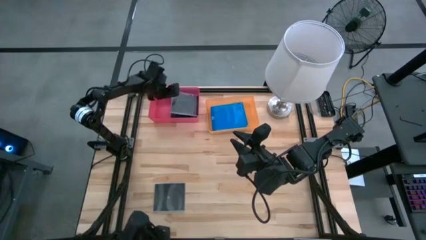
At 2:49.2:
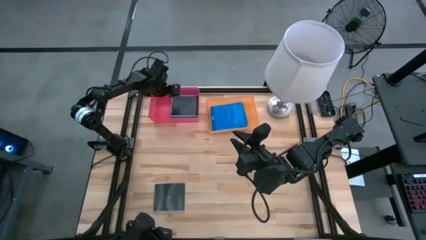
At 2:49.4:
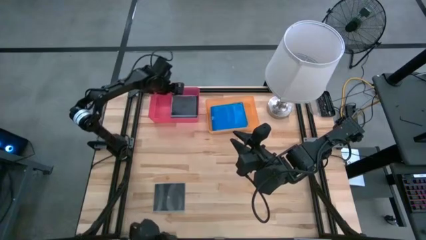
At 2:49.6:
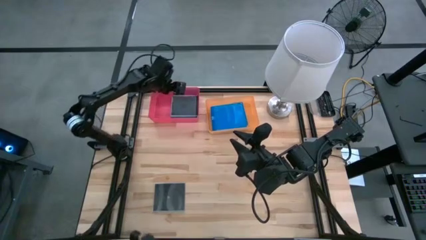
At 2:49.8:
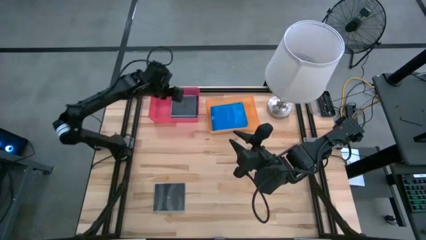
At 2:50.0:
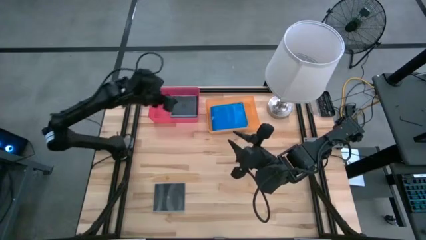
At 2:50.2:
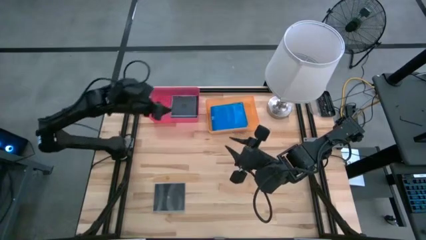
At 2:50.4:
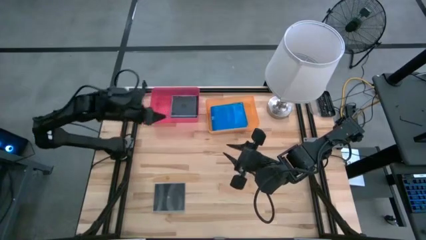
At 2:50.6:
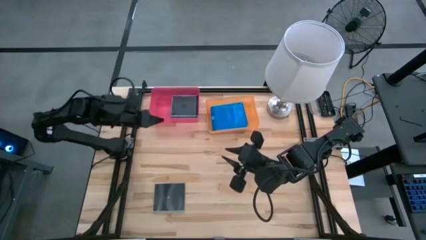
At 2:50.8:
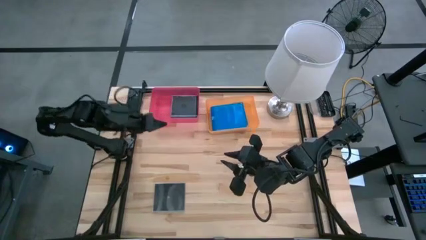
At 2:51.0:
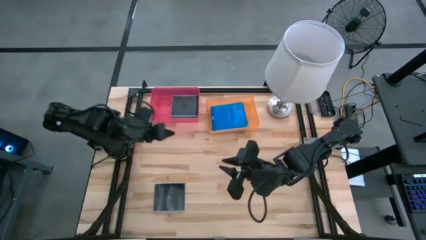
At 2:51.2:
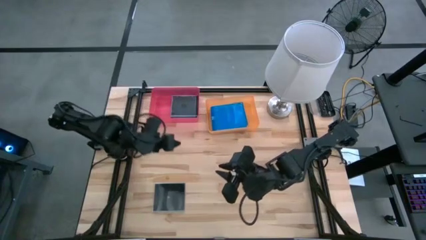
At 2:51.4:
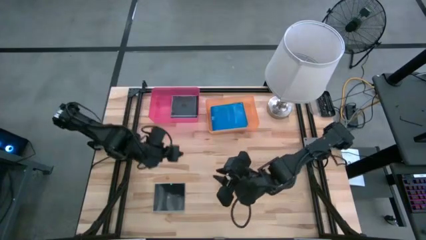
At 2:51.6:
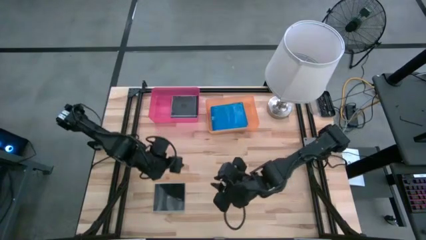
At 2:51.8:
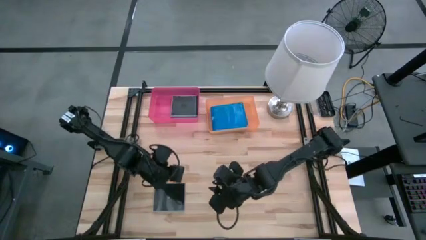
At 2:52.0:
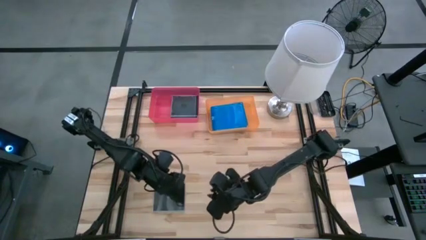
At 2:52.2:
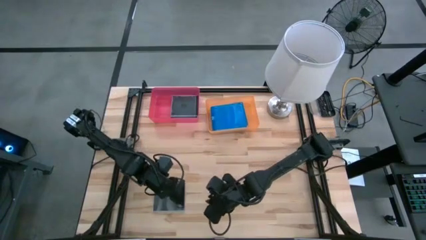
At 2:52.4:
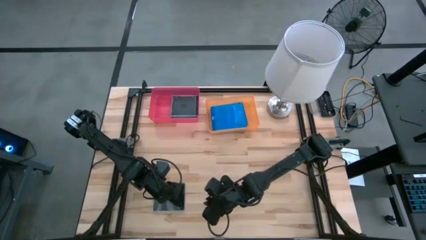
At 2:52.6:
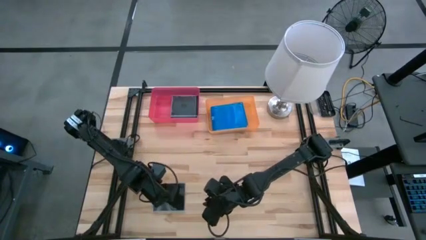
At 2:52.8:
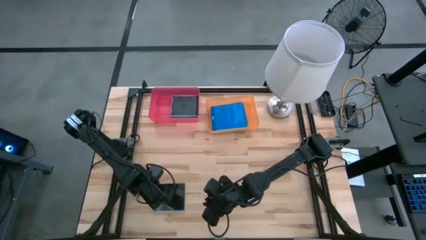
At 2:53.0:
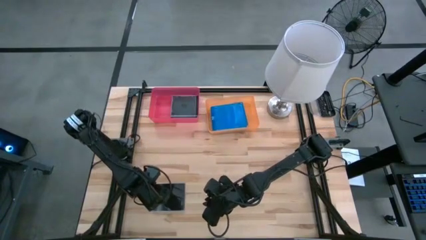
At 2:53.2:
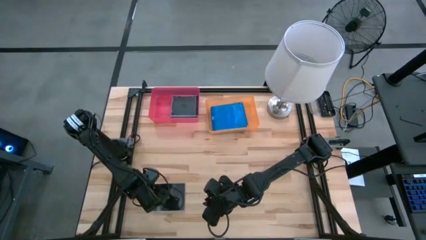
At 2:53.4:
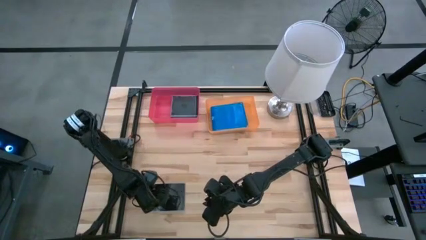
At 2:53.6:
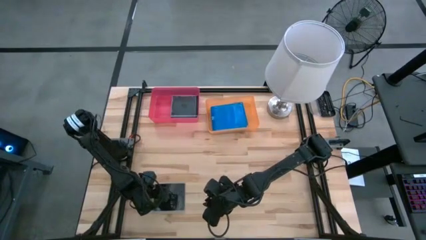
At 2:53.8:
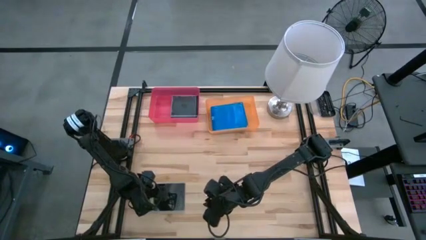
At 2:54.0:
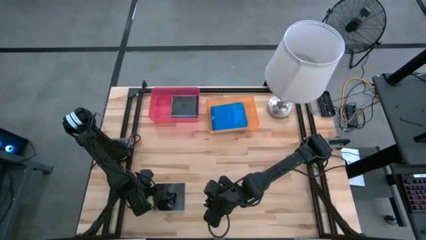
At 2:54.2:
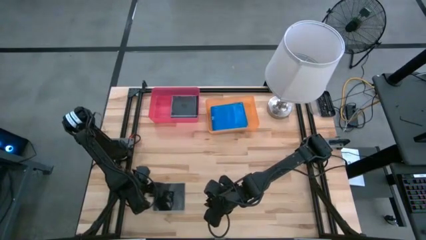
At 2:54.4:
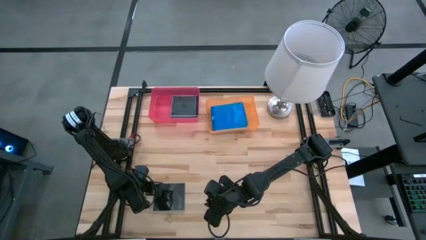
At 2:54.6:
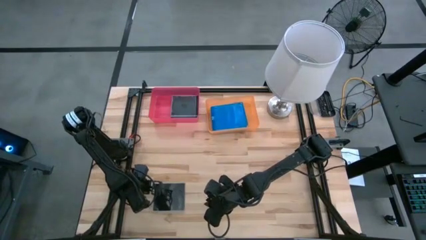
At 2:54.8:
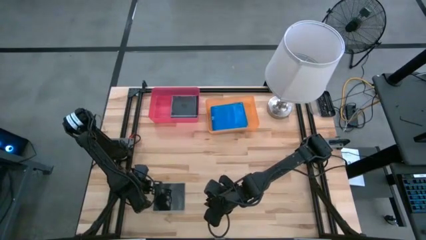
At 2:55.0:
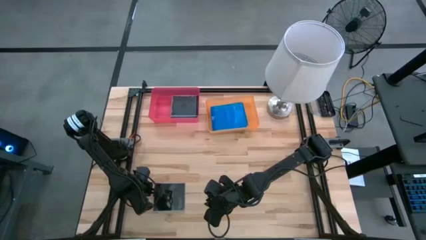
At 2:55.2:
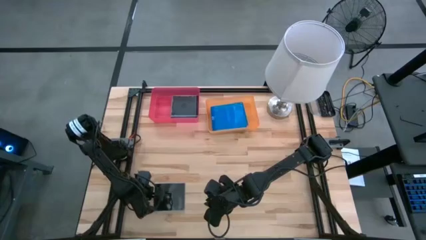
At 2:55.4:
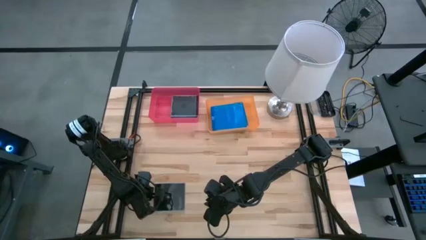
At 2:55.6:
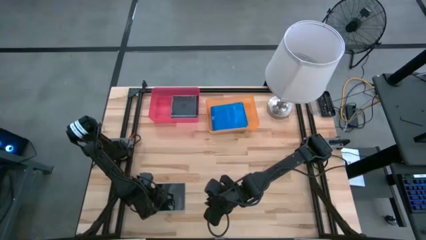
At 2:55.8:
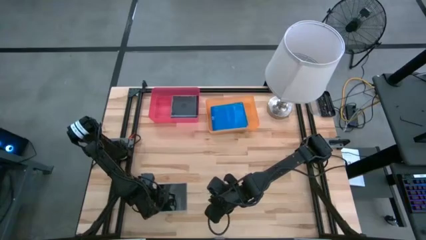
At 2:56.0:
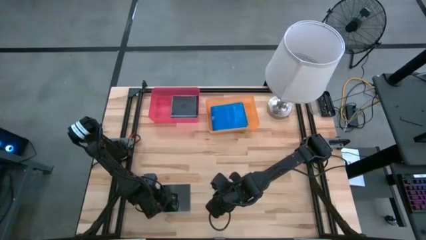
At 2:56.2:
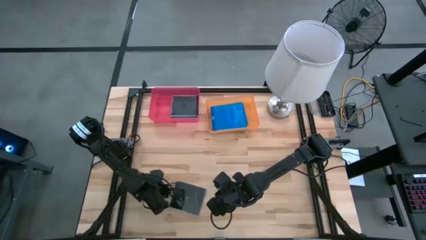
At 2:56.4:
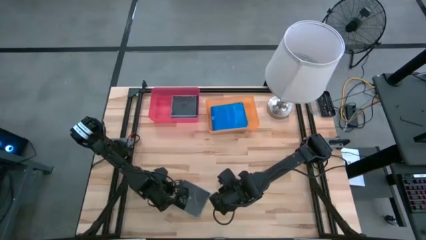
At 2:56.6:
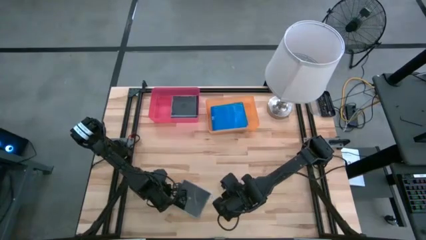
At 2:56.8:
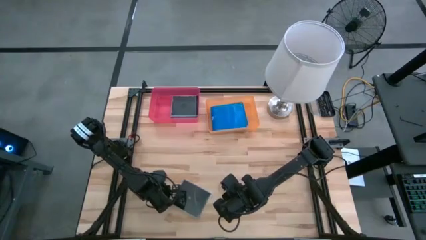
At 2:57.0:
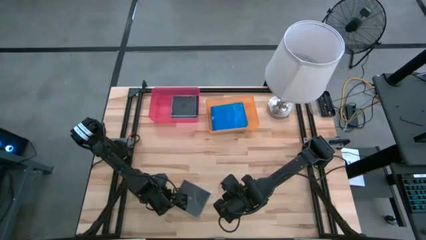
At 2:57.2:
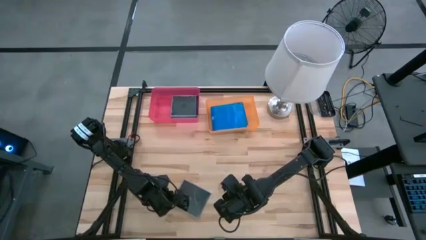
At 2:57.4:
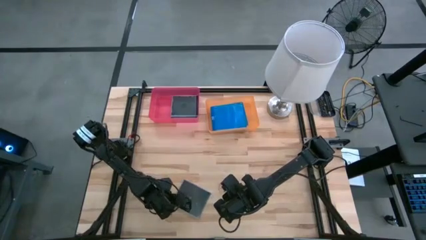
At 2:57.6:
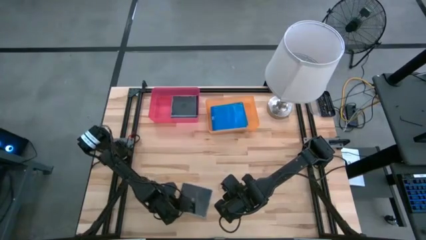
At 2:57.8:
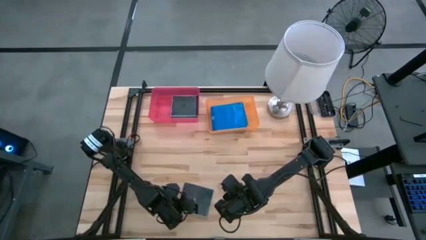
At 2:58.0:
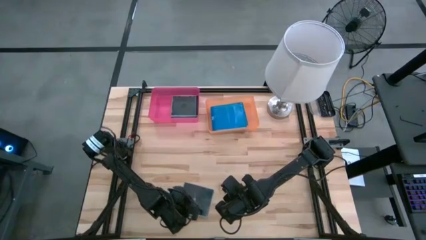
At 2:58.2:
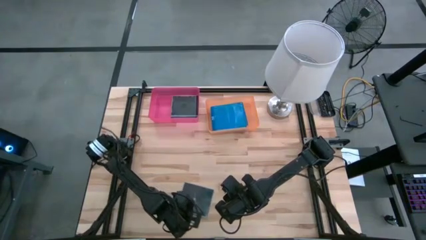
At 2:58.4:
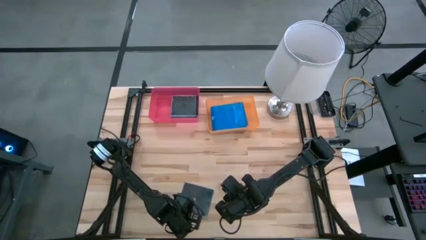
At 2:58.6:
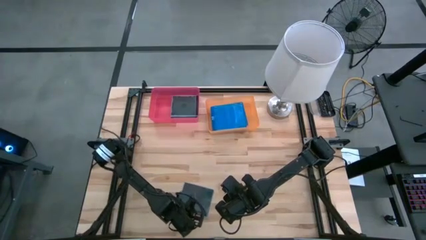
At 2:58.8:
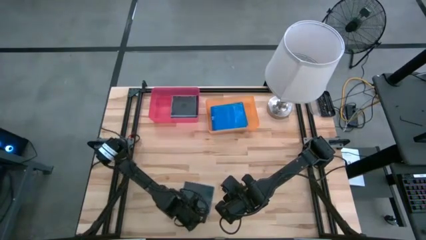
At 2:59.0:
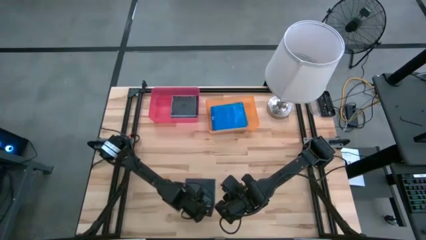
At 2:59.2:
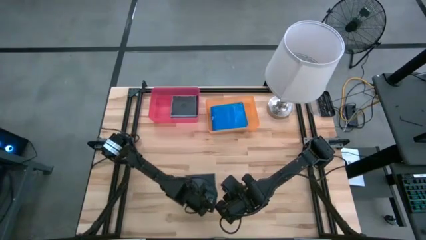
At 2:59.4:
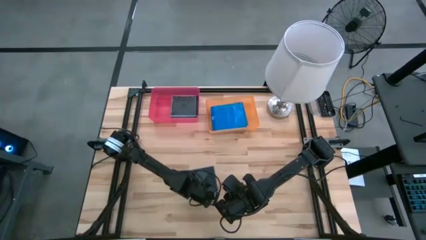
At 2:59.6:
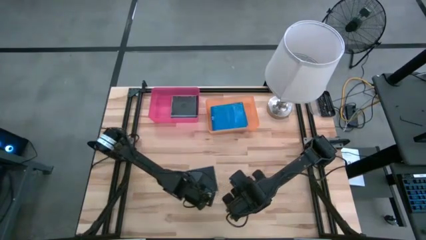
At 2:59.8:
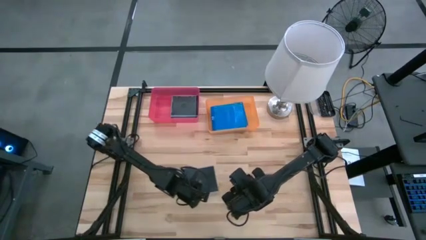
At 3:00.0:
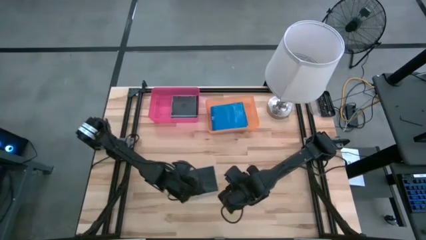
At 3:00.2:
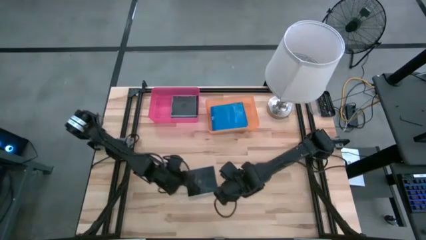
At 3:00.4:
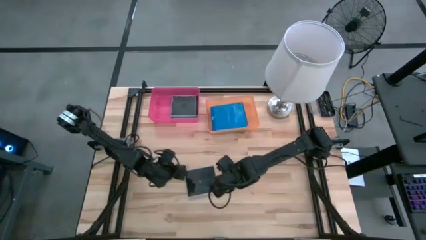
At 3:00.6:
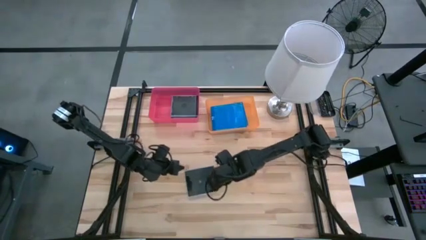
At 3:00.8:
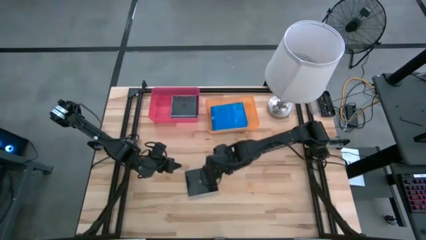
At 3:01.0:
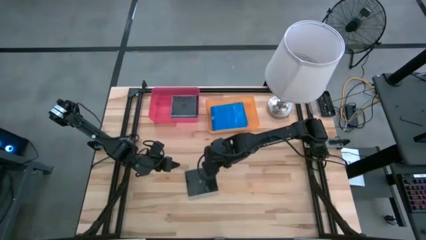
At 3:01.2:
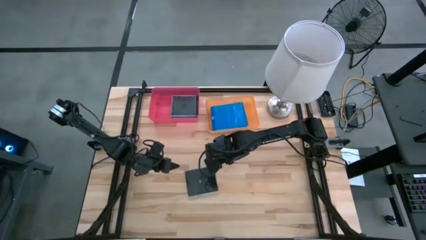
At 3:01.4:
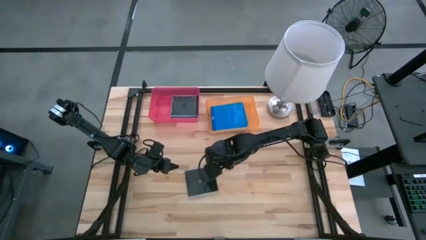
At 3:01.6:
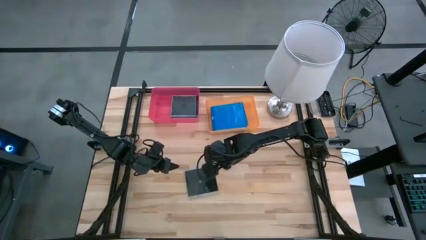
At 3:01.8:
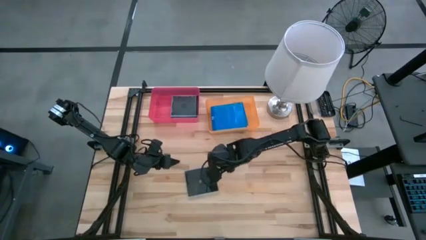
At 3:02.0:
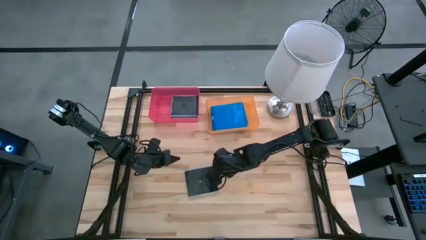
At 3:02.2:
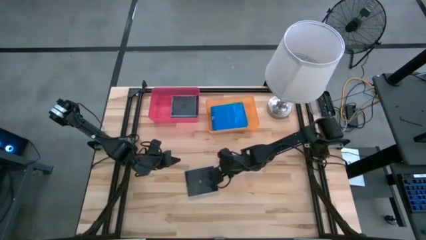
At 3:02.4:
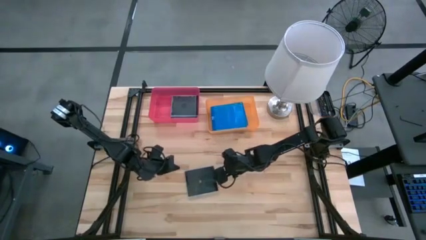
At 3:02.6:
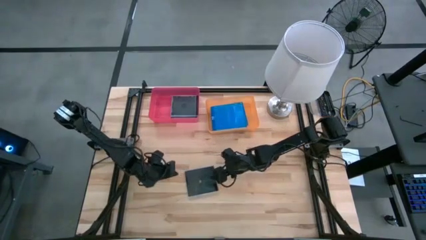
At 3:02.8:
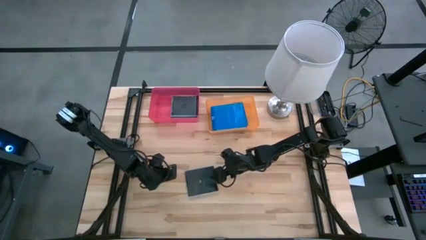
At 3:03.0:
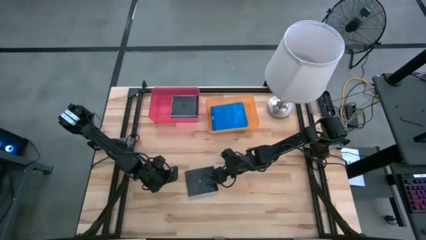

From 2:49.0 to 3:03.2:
Task: Pick & place jewel cases by type
Put the black CD case into the pink bin
